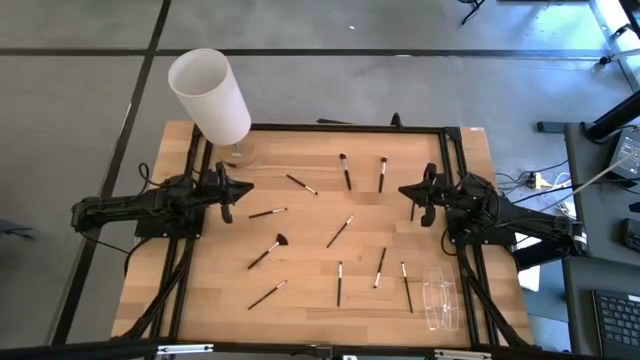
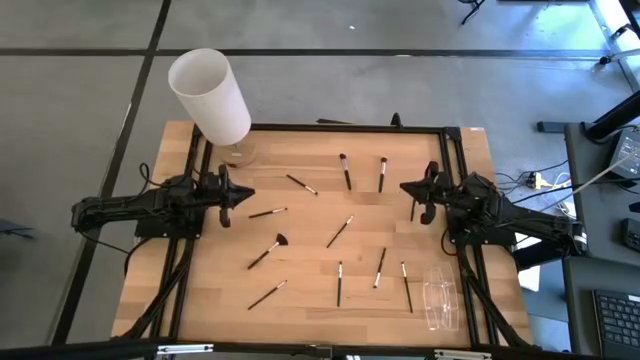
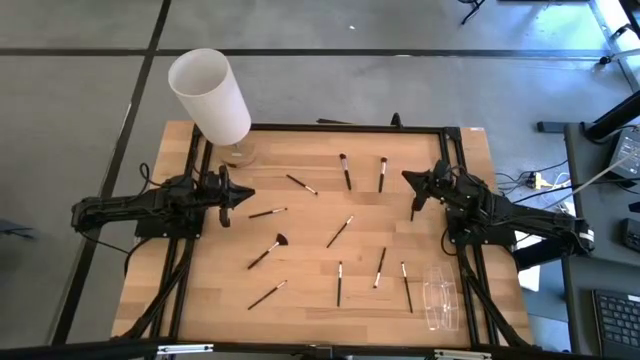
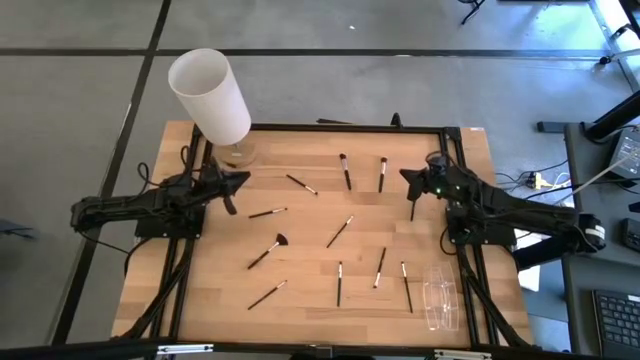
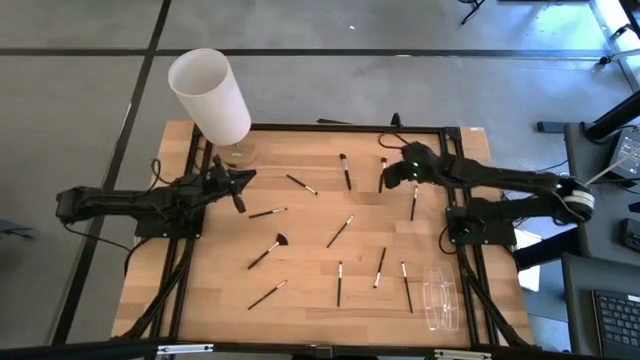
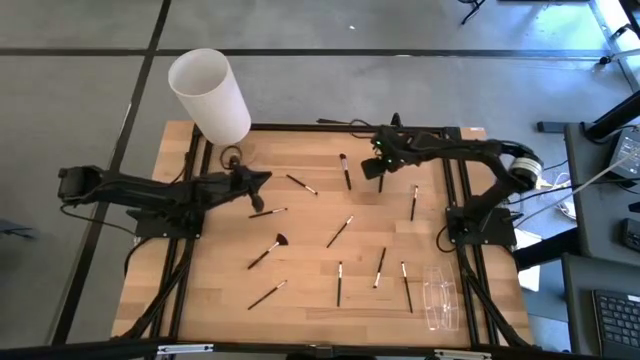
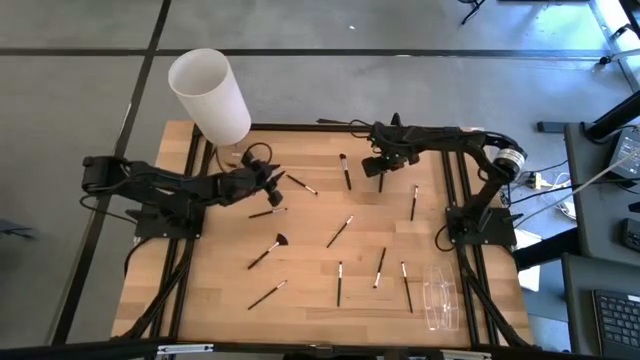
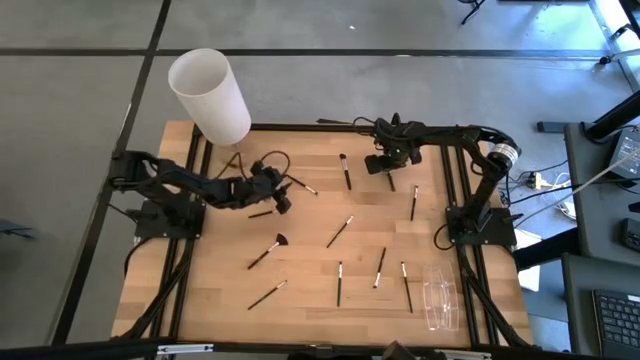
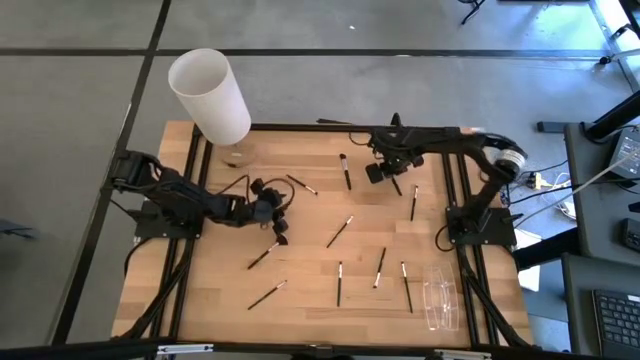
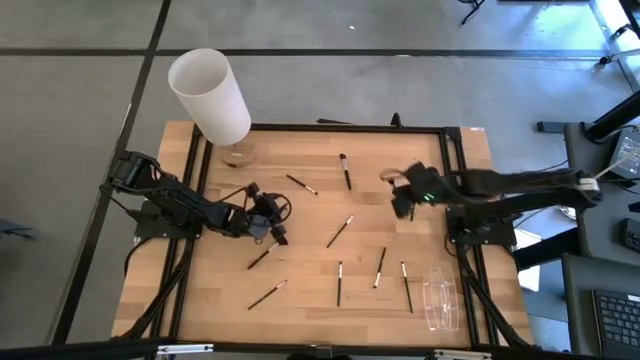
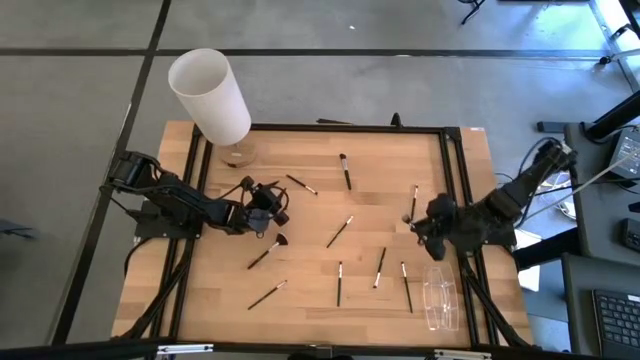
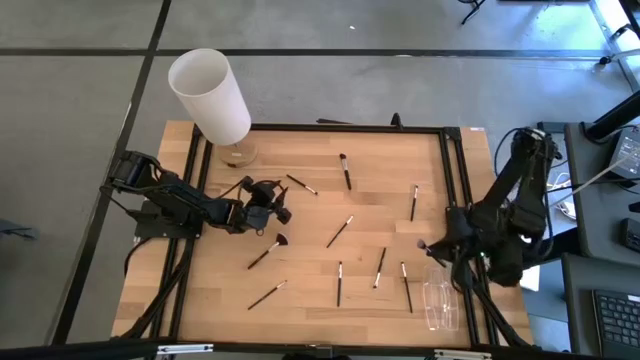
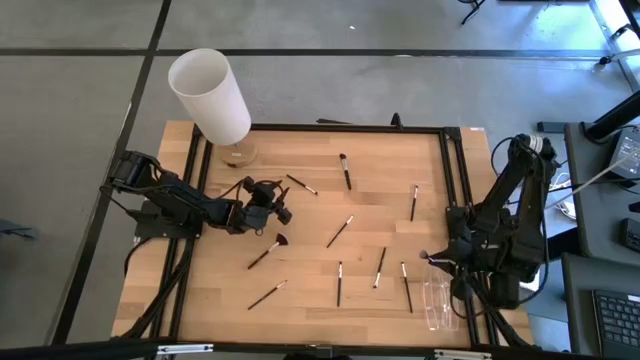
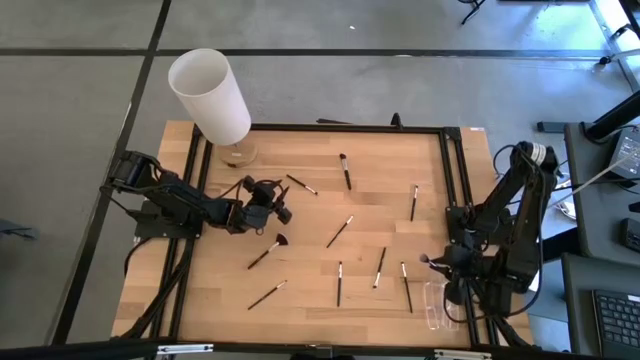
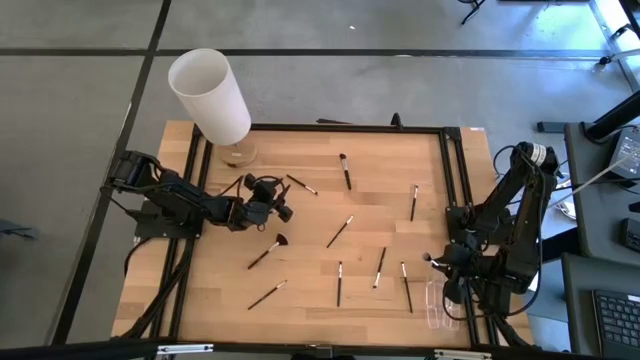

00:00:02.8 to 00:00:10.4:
Task: Put items in baskets/containers
Put the foundation brush into the transparent organizer

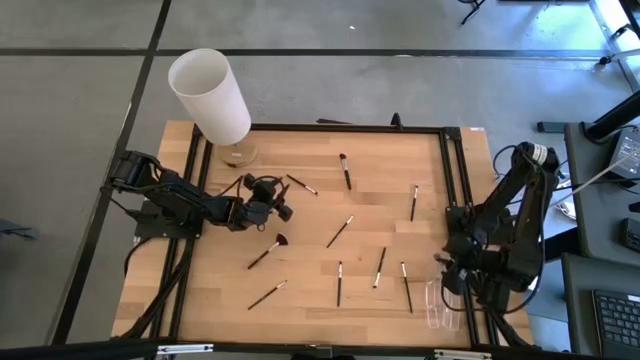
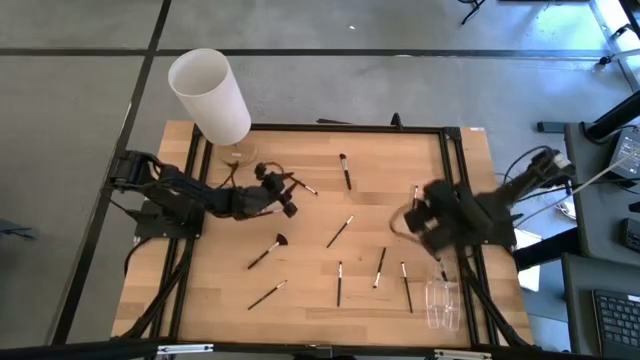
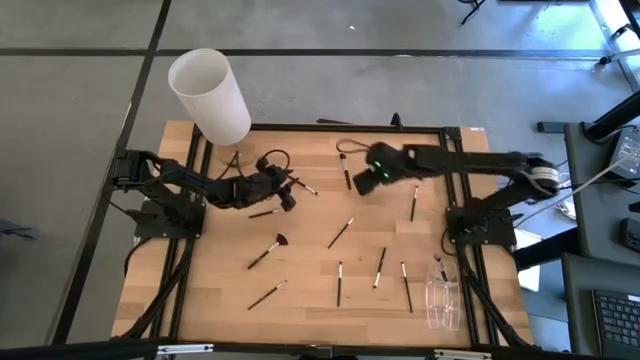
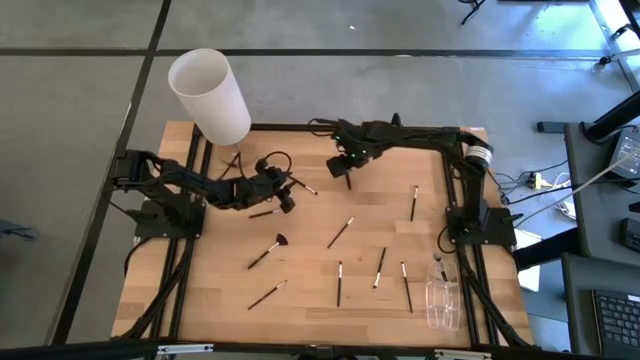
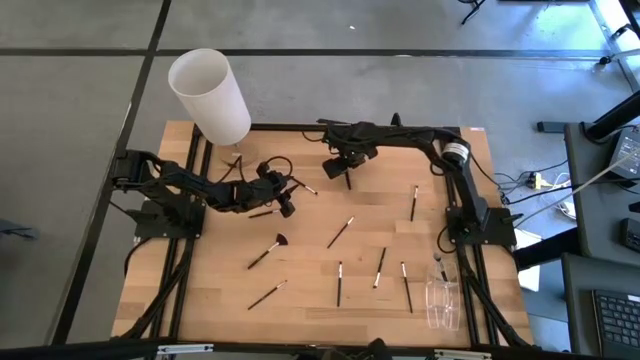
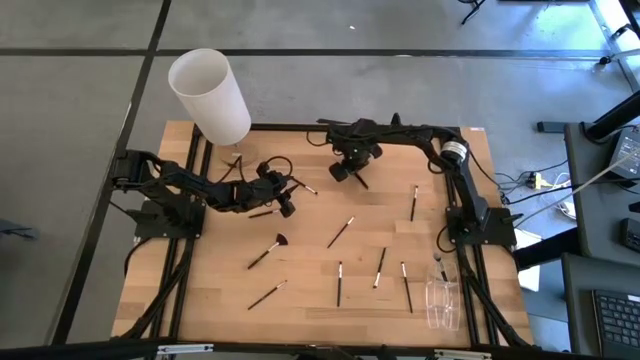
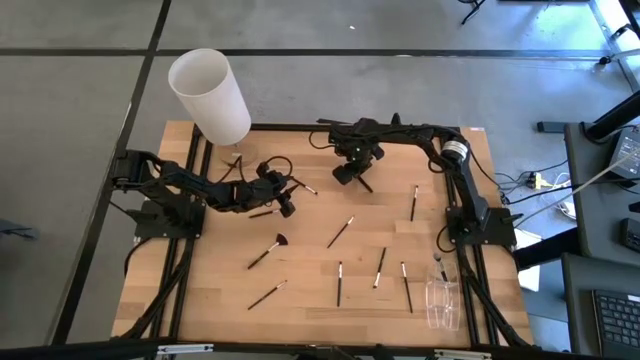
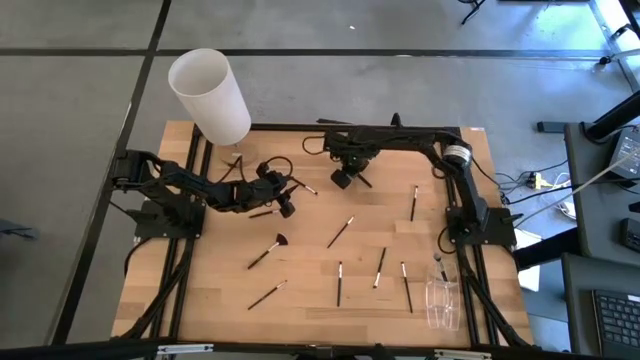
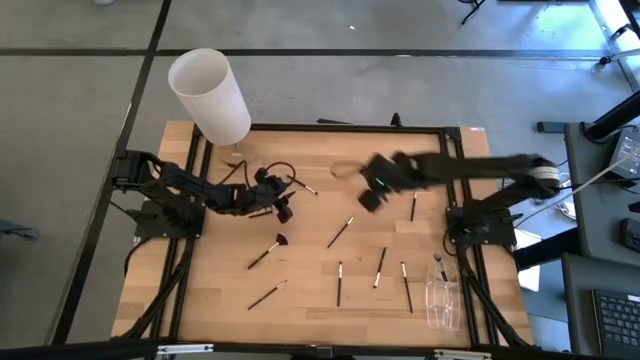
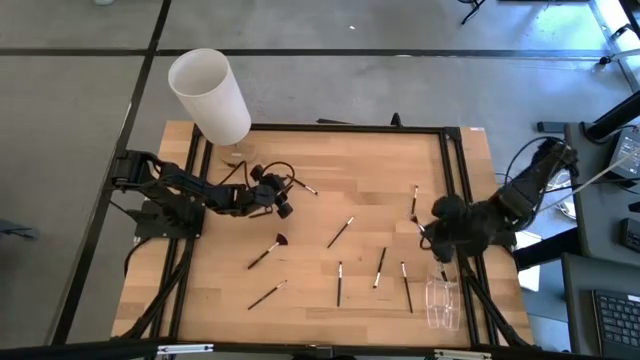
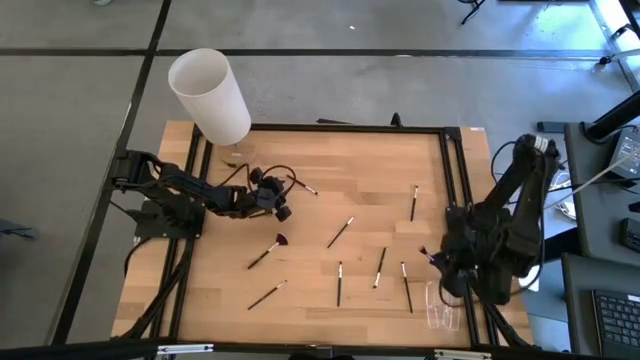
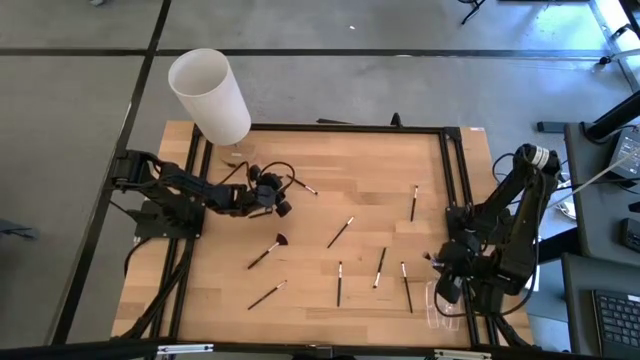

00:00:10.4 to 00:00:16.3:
Put the foundation brush into the transparent organizer

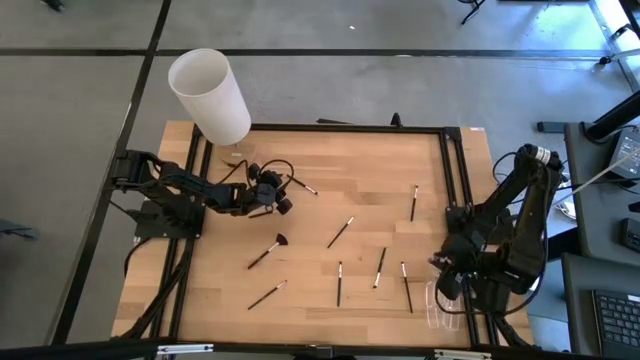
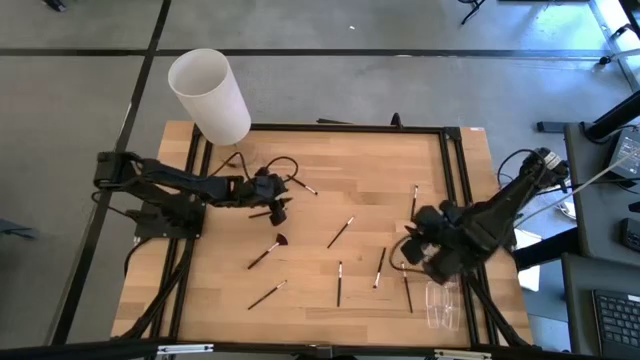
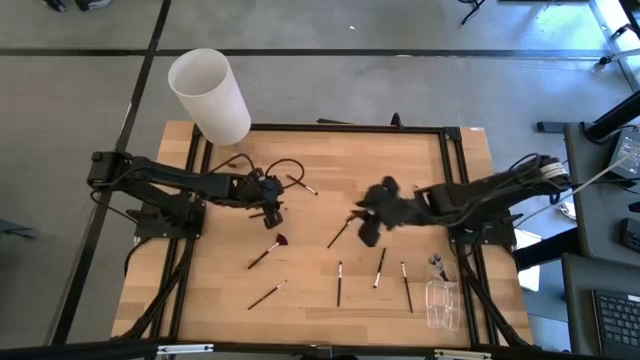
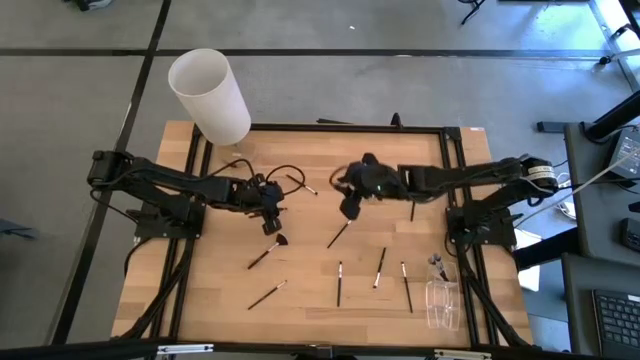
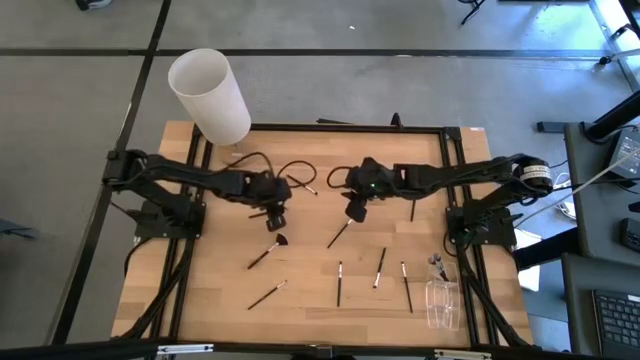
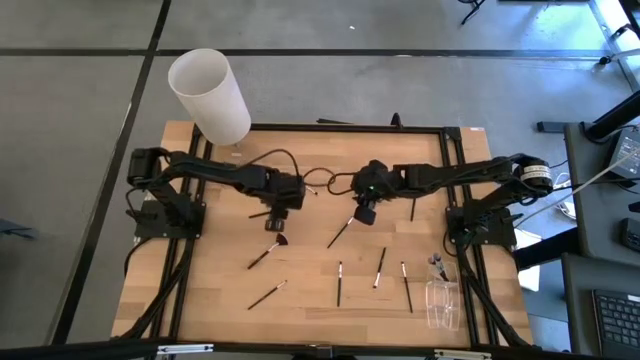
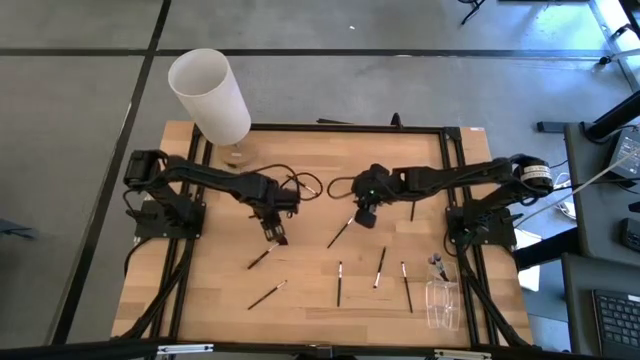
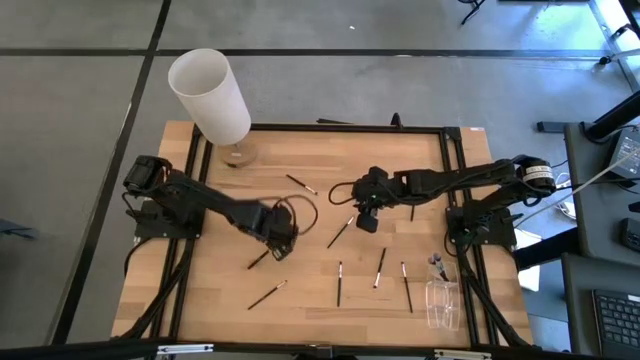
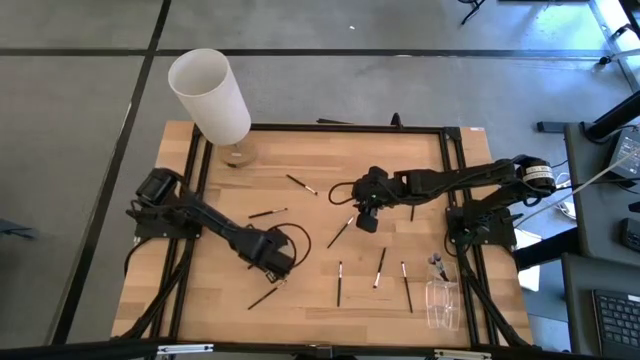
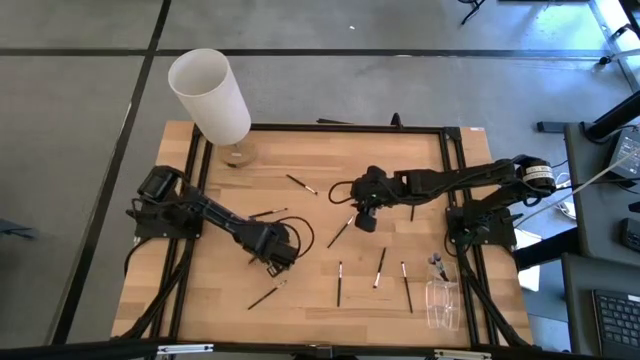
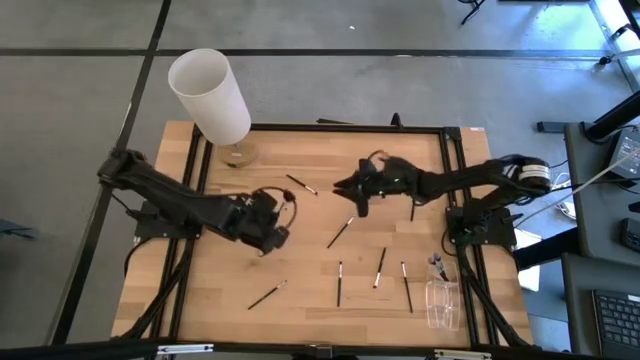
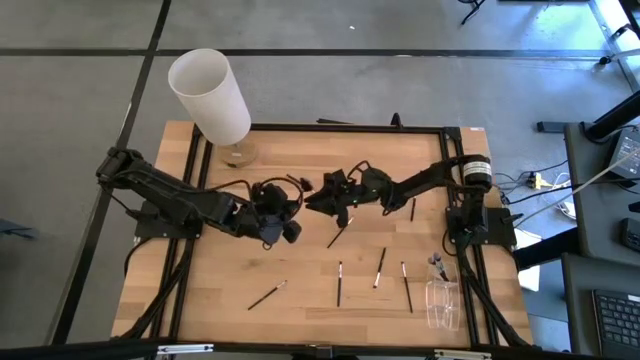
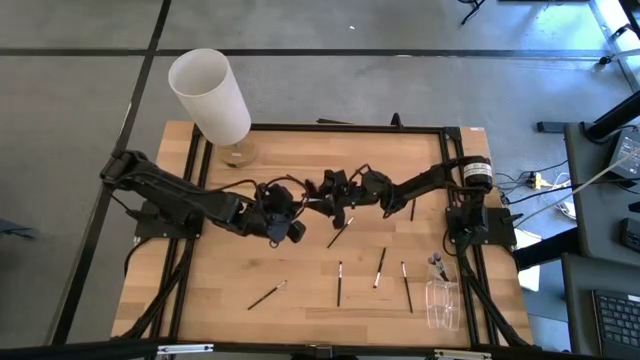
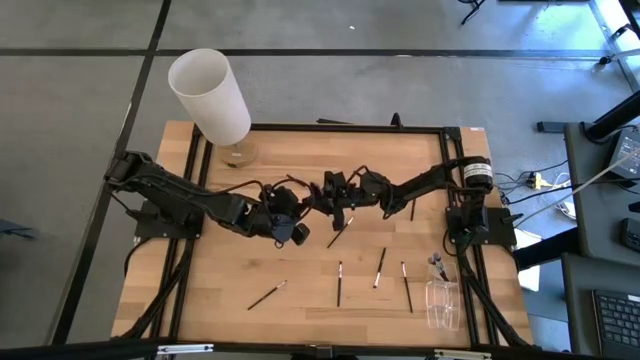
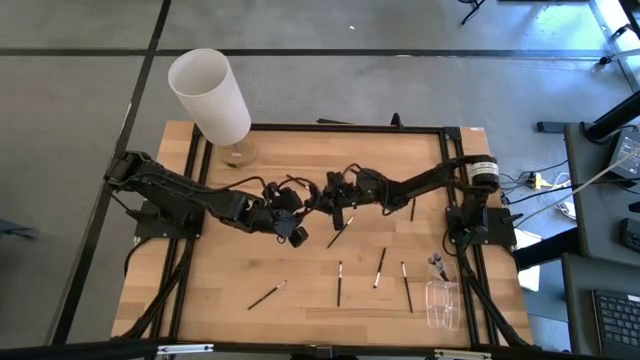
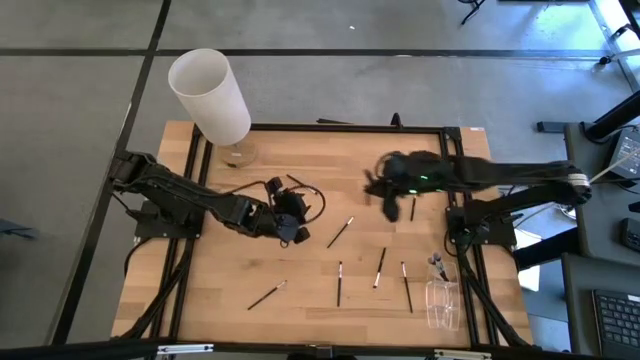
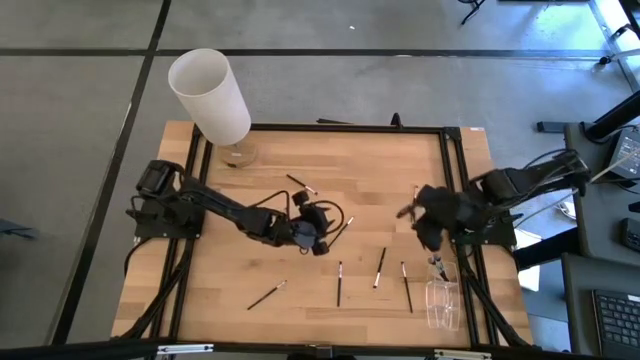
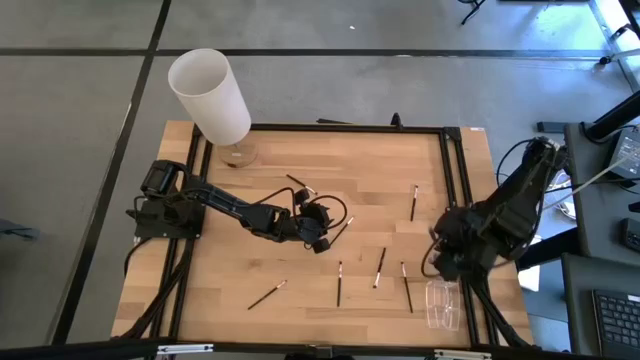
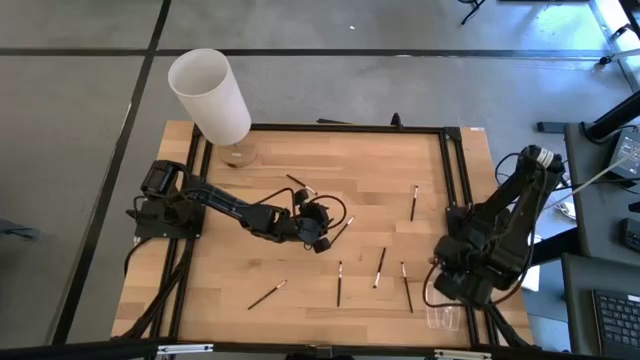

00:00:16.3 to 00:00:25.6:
Put the highlighter brush into the transparent organizer
